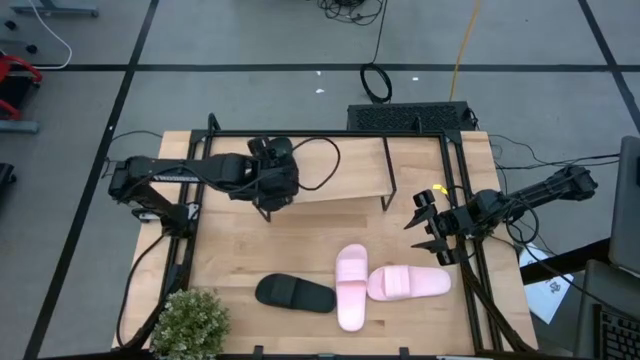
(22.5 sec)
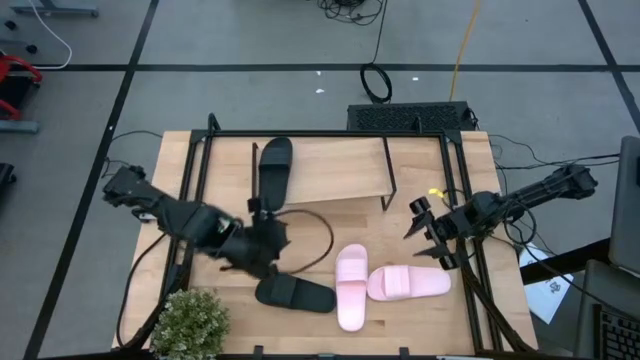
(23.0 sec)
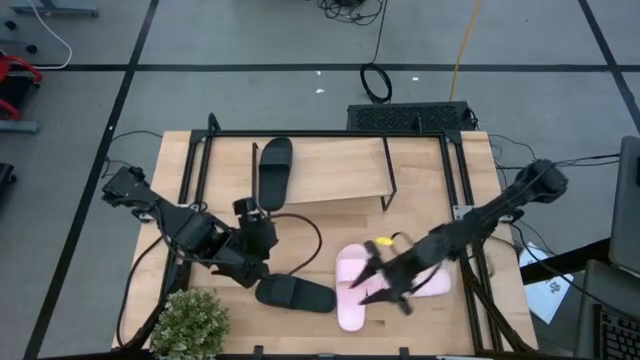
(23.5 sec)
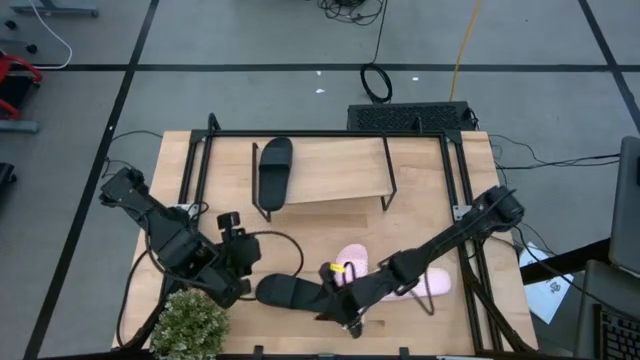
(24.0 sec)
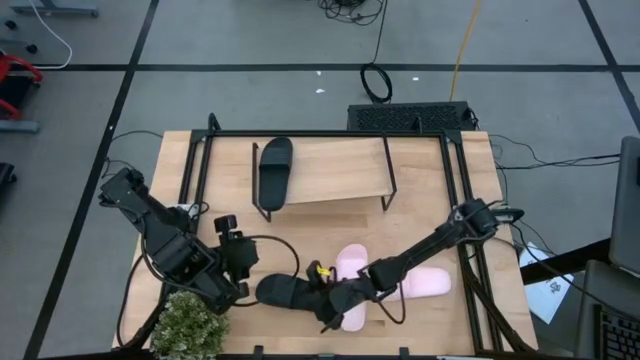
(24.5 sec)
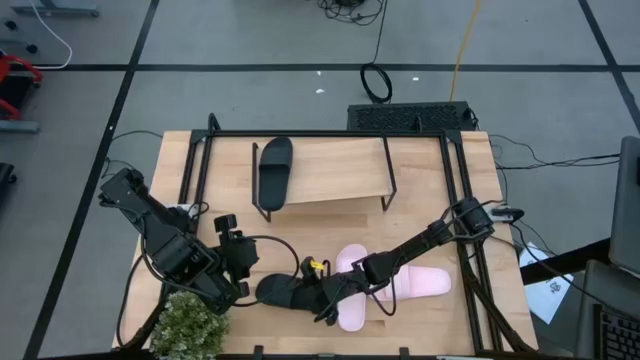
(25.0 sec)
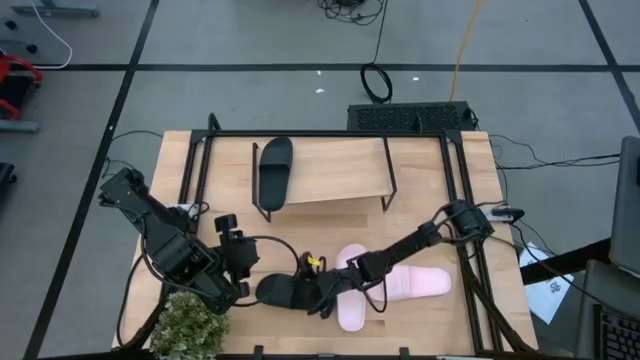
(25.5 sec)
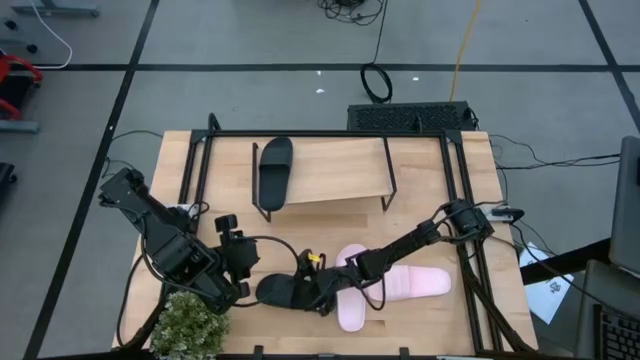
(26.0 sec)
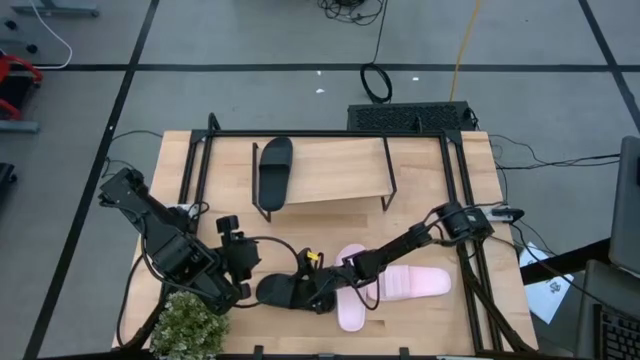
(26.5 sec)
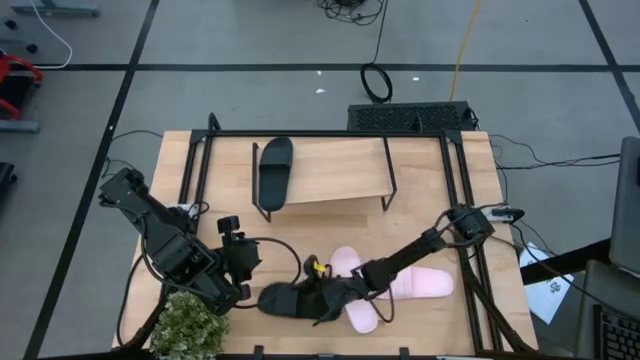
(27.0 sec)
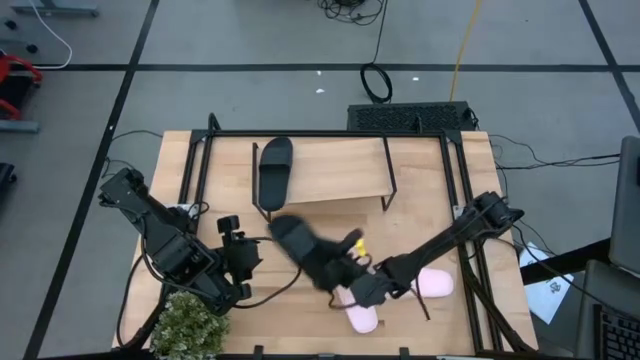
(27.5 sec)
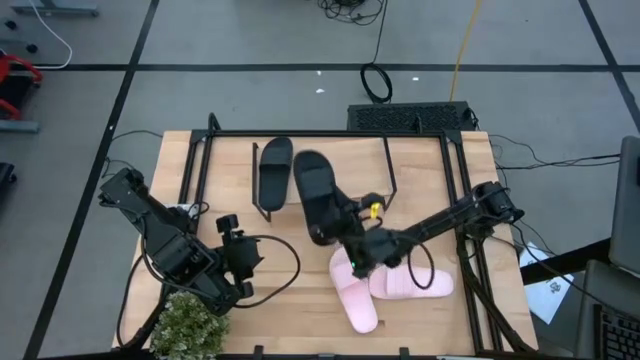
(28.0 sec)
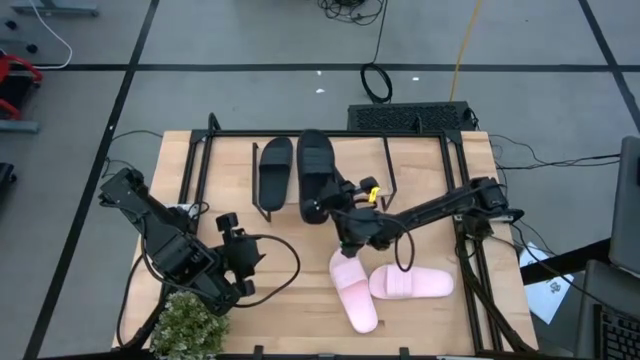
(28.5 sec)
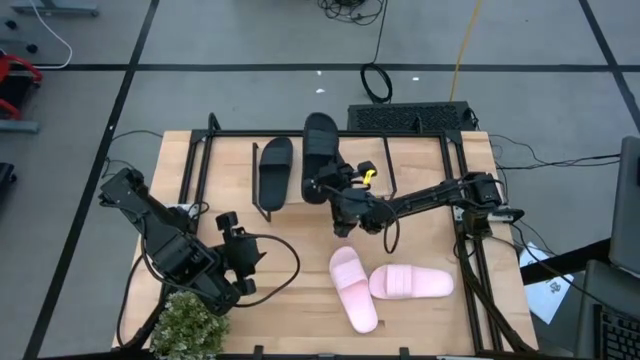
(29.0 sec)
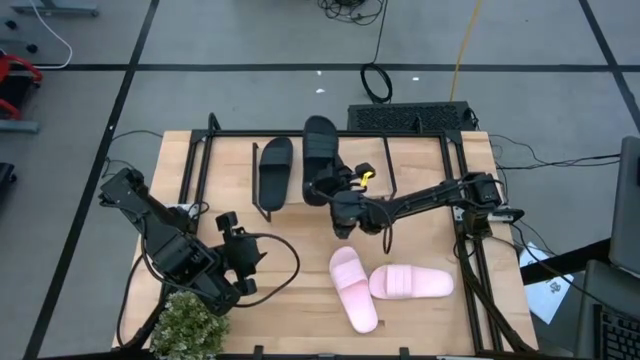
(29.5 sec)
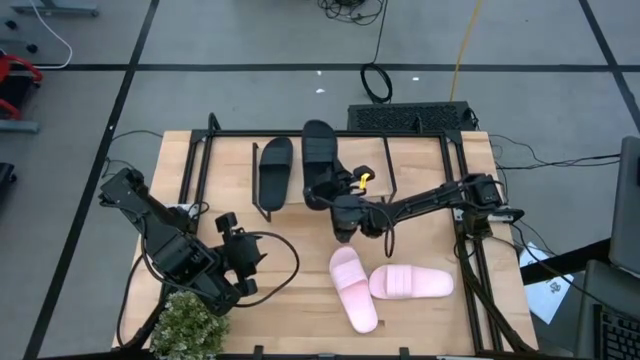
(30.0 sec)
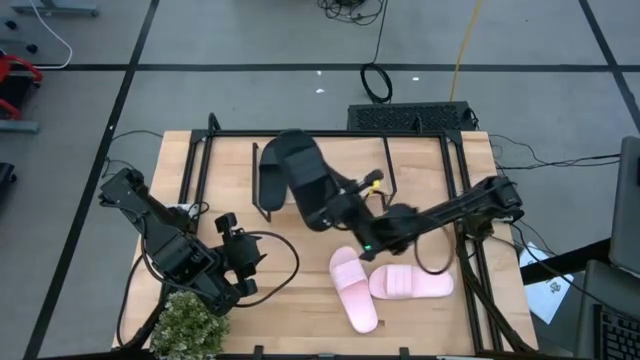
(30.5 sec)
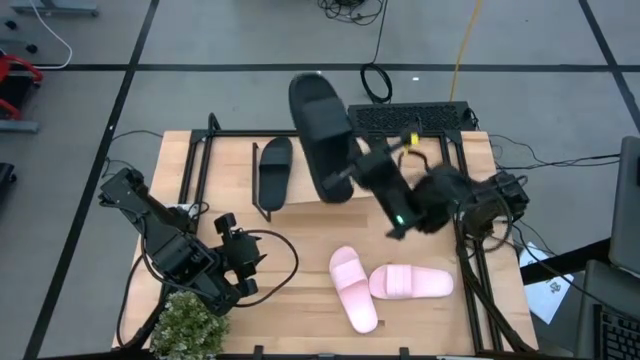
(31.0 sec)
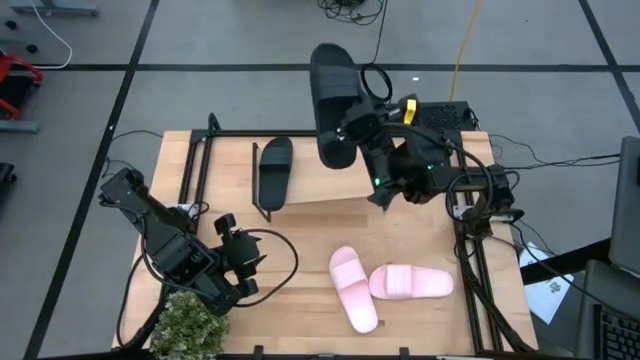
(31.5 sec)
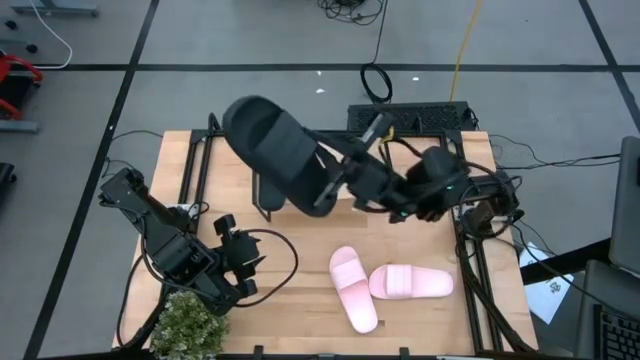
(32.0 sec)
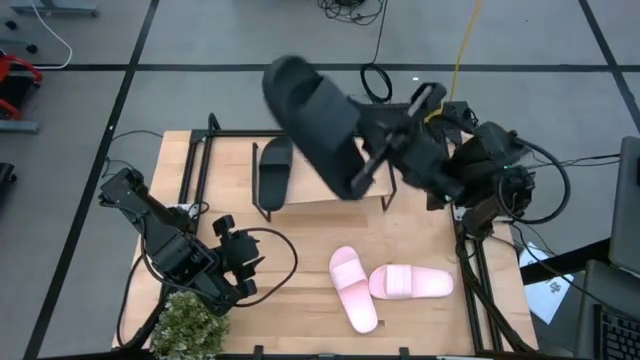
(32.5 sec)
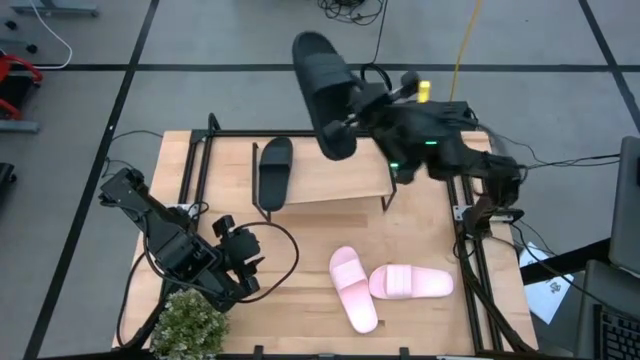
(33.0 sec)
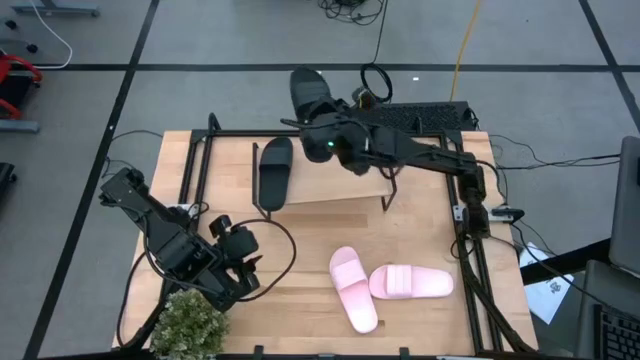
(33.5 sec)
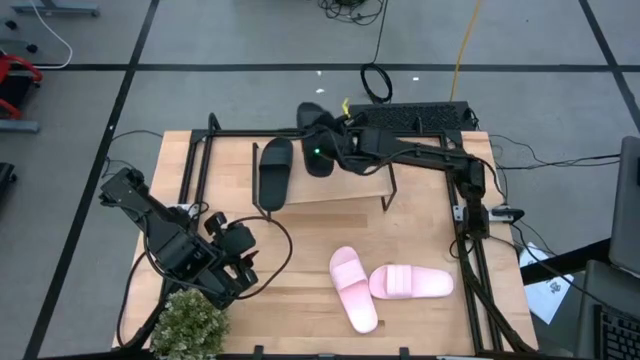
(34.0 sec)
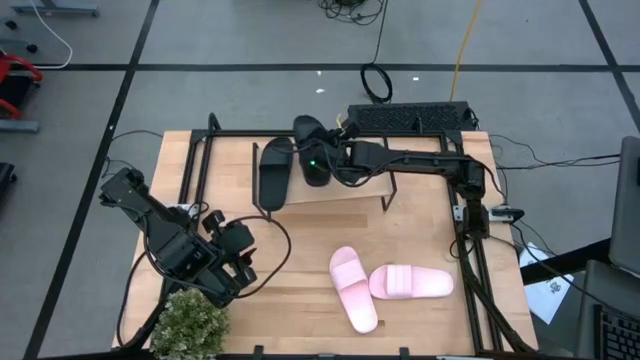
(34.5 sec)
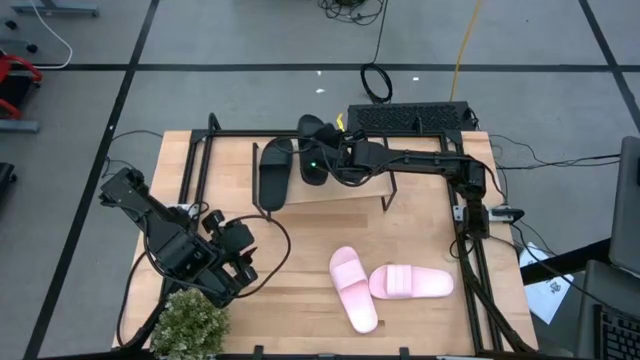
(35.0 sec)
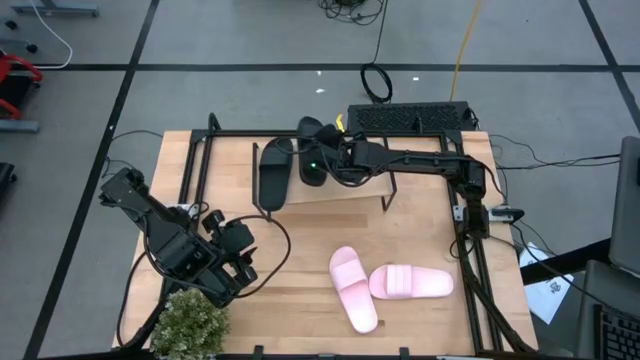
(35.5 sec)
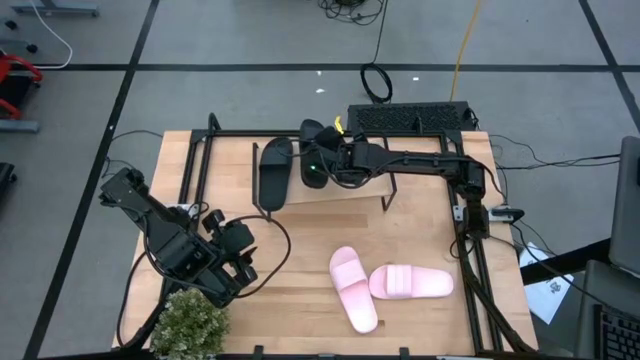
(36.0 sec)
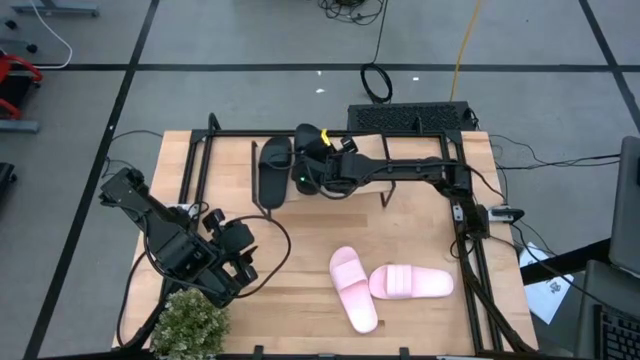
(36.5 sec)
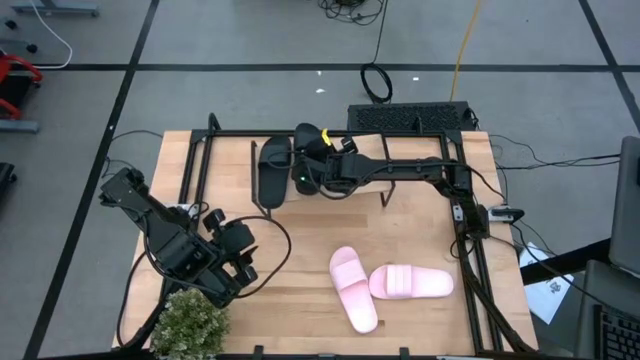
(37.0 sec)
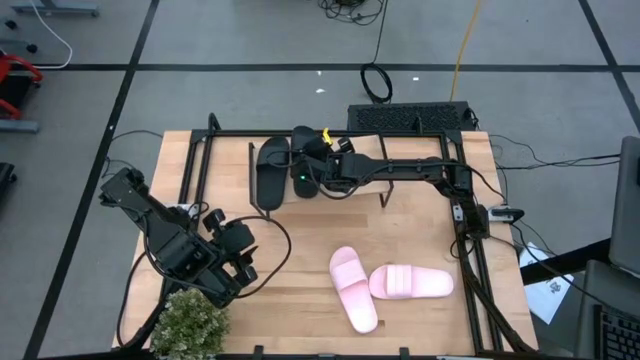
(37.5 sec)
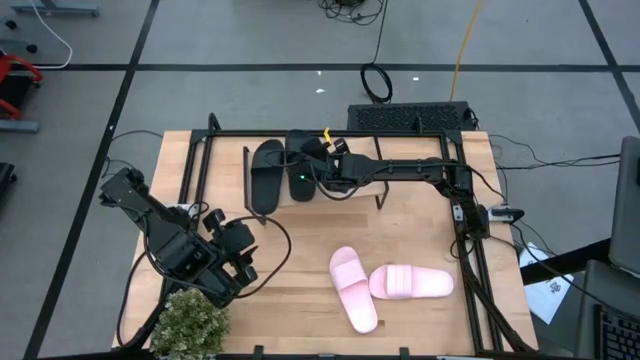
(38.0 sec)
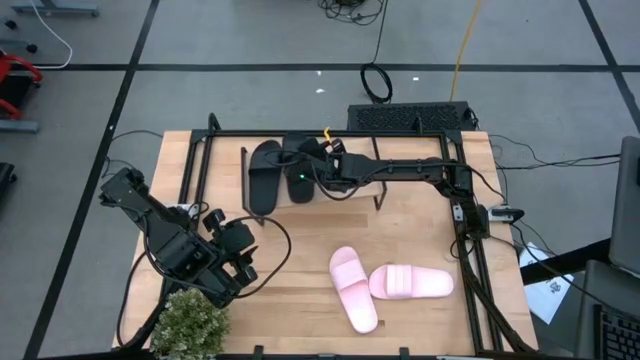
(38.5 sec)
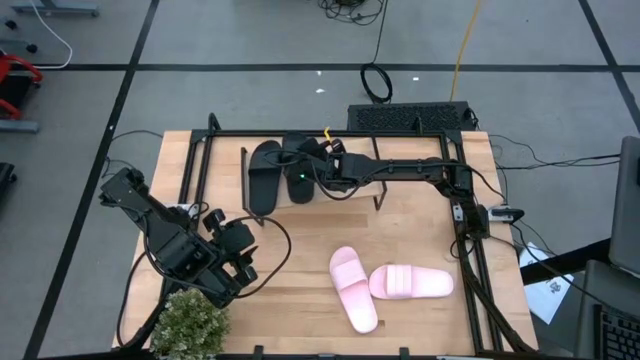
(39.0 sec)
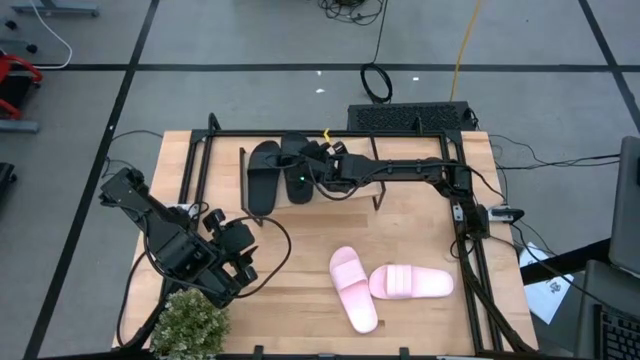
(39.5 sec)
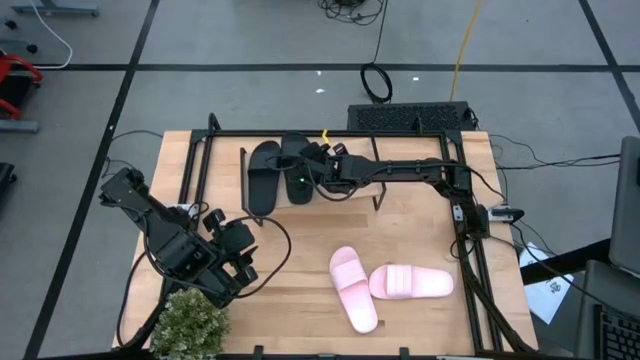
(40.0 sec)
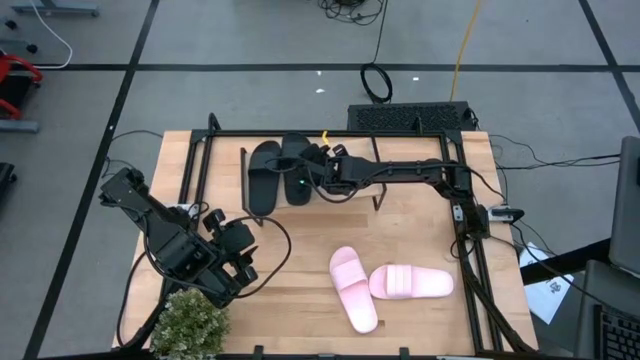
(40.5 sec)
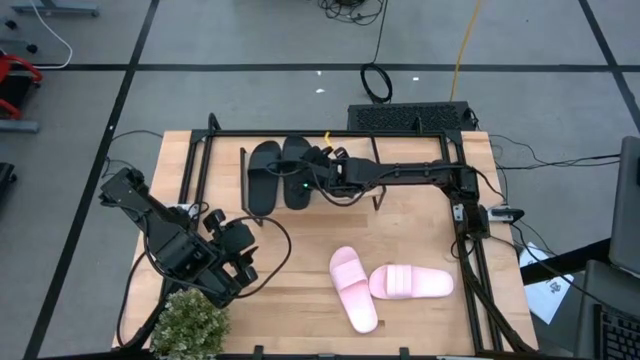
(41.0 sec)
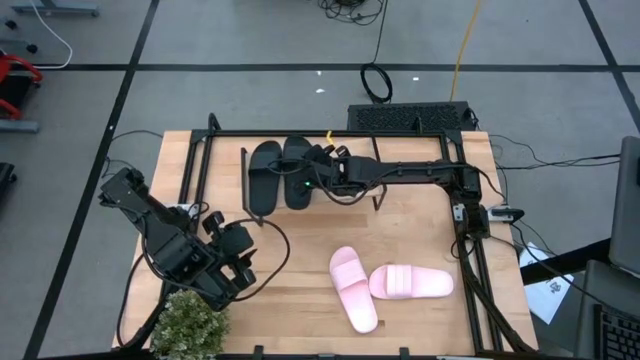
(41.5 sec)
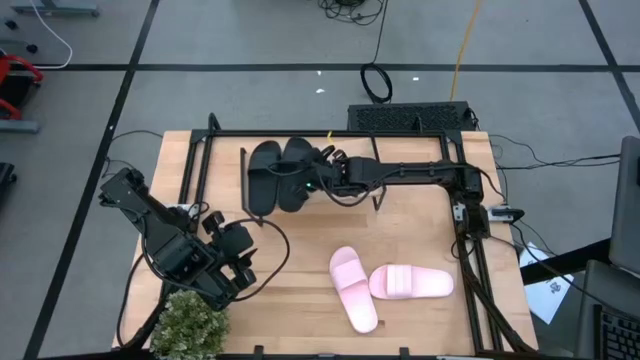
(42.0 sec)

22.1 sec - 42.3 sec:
Task: Pick and place slides into the shelf
Put the black slide on the shelf
